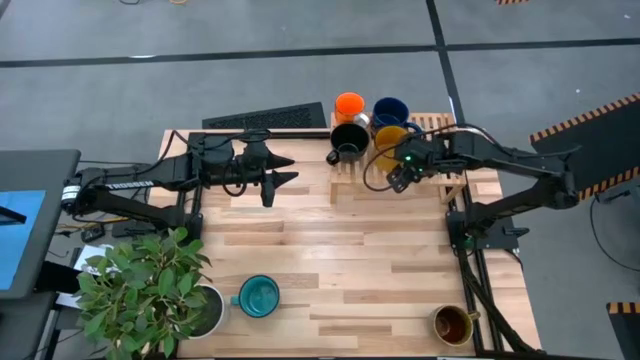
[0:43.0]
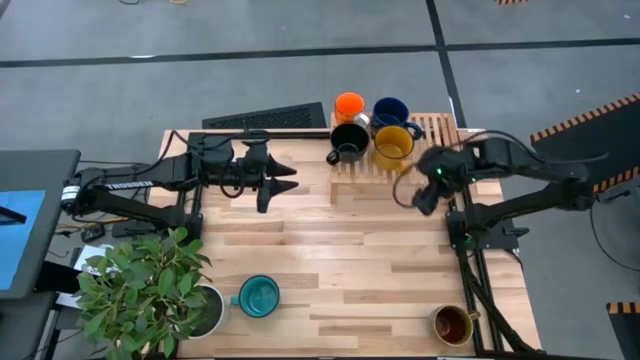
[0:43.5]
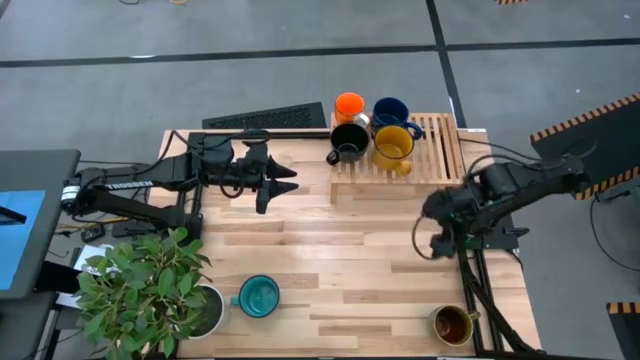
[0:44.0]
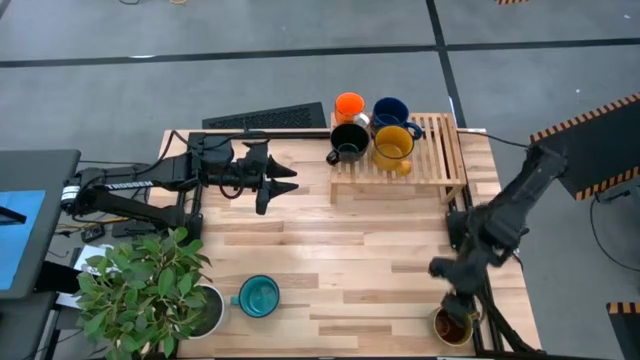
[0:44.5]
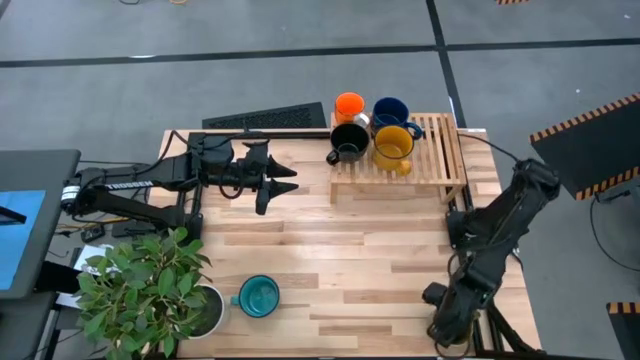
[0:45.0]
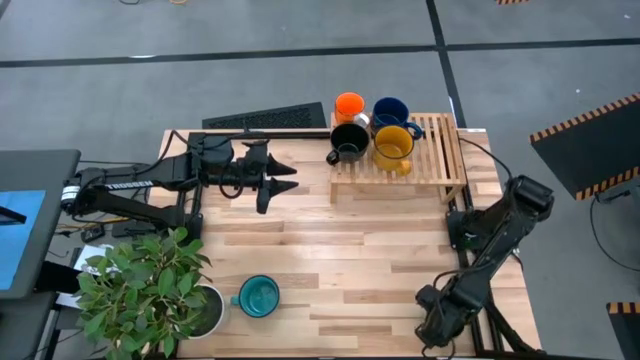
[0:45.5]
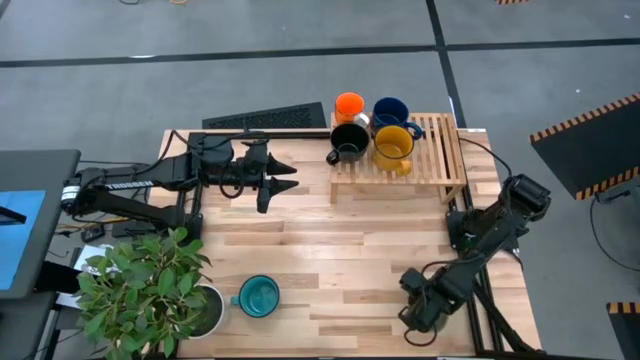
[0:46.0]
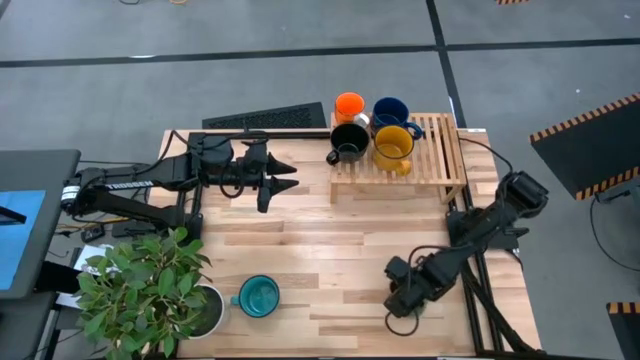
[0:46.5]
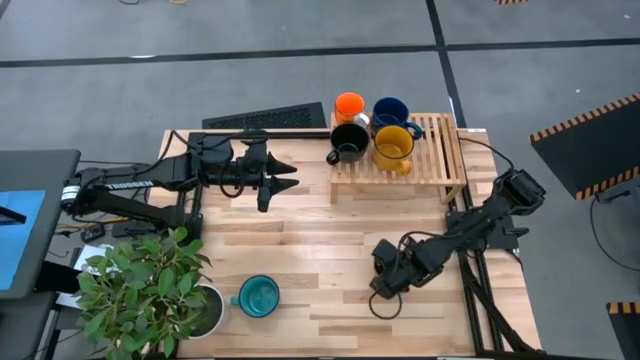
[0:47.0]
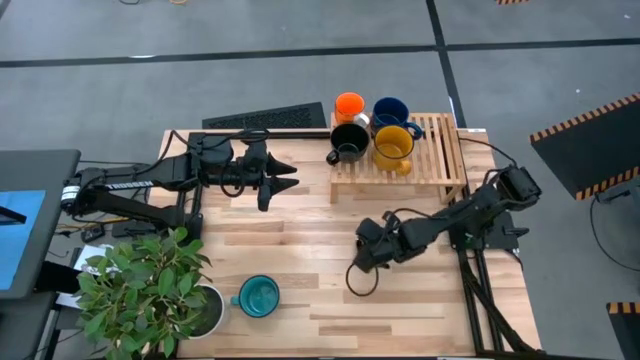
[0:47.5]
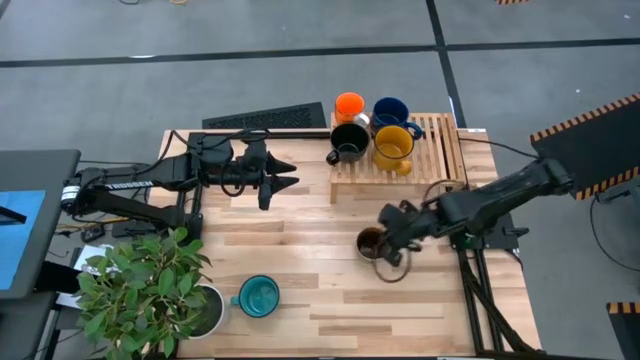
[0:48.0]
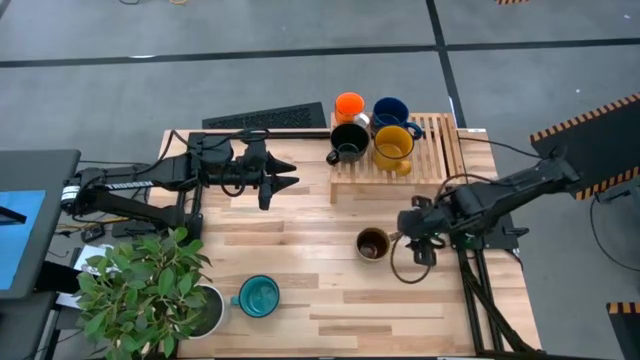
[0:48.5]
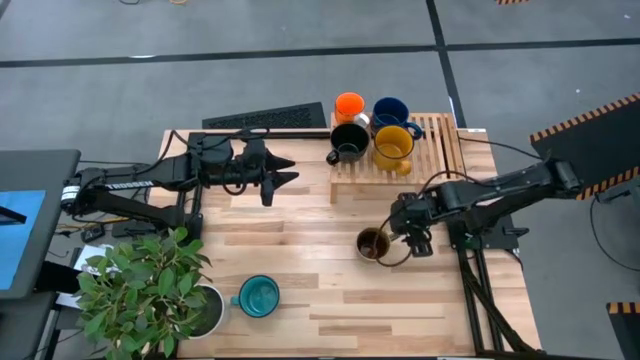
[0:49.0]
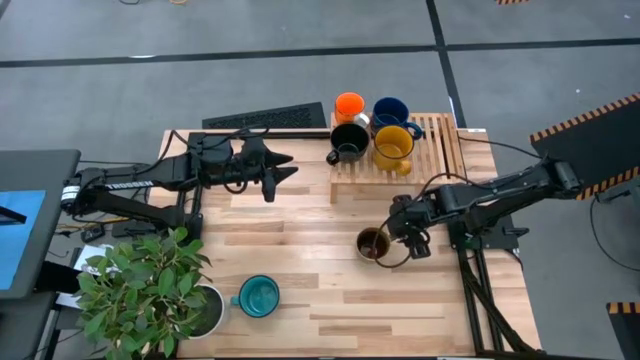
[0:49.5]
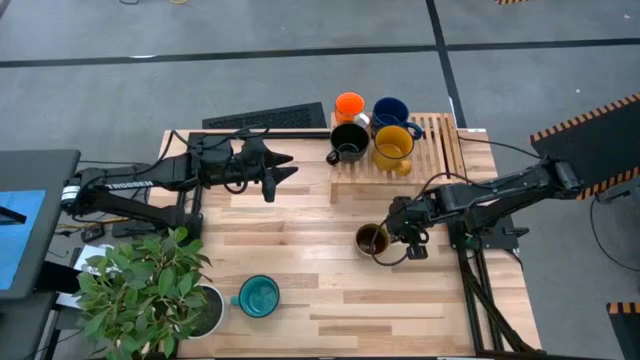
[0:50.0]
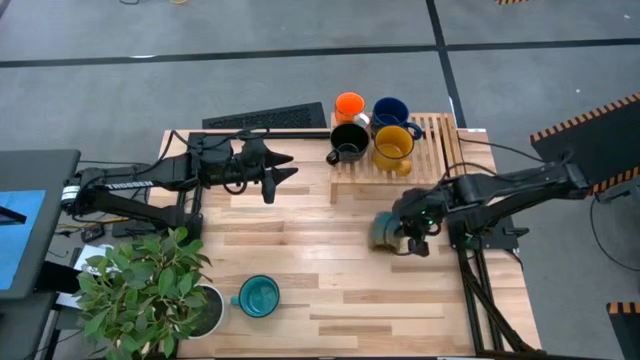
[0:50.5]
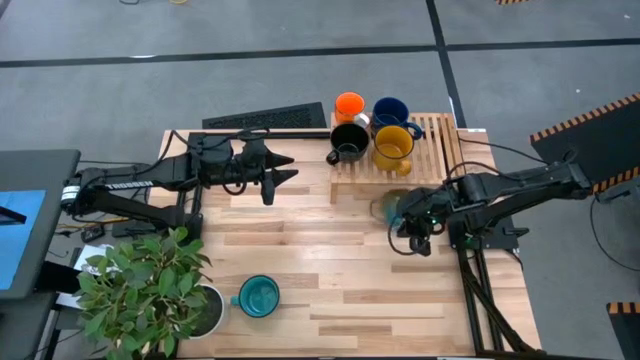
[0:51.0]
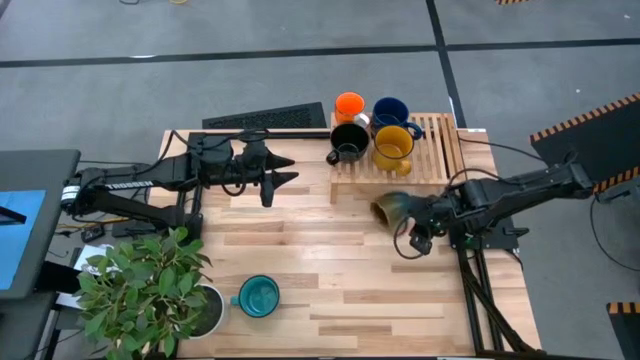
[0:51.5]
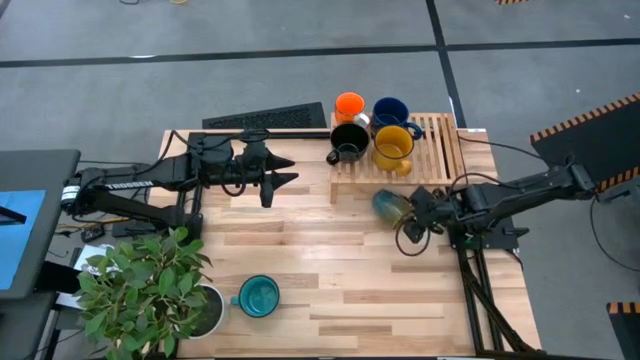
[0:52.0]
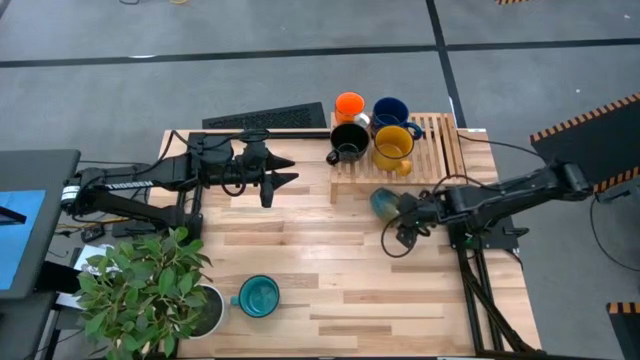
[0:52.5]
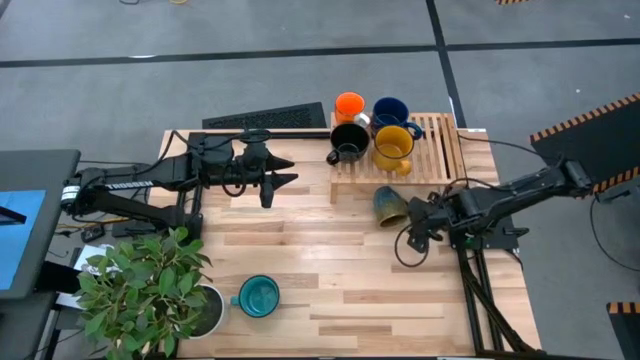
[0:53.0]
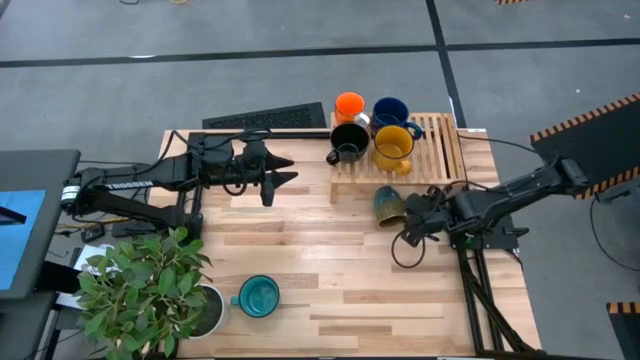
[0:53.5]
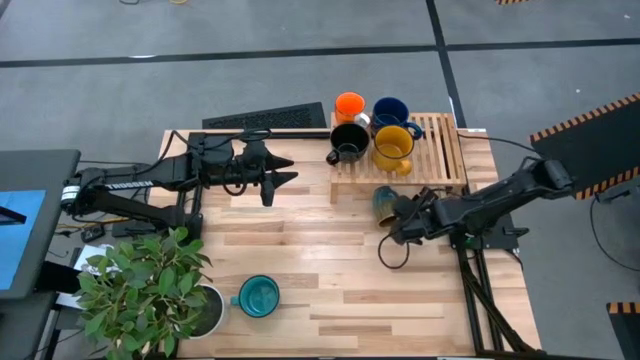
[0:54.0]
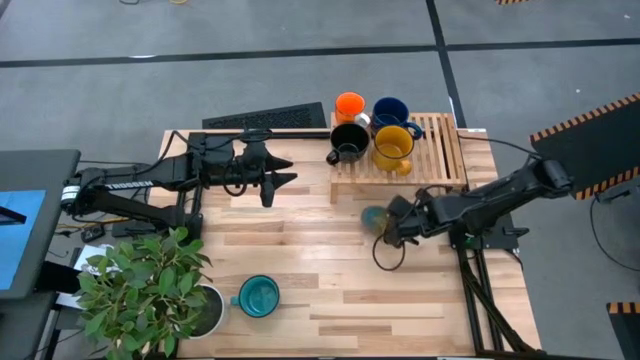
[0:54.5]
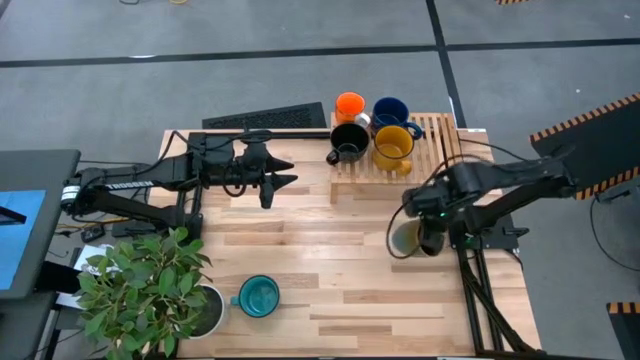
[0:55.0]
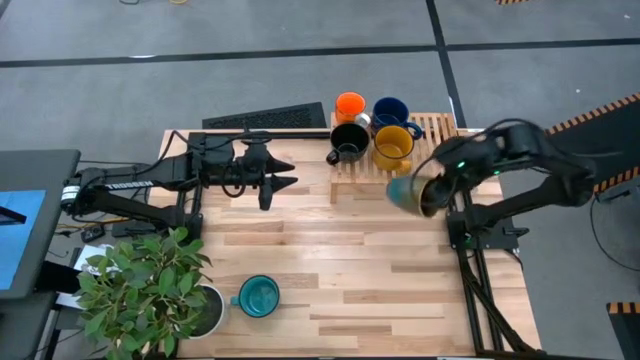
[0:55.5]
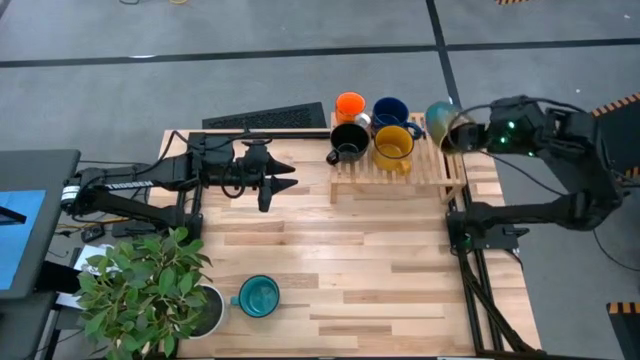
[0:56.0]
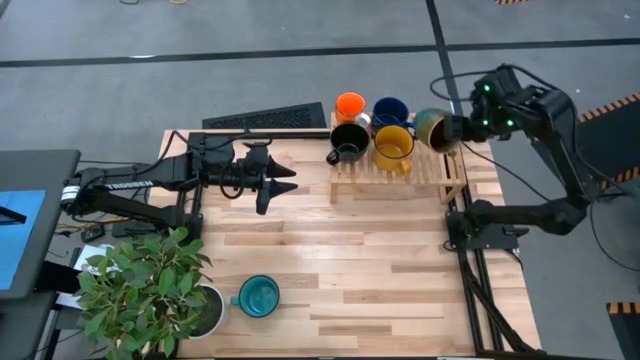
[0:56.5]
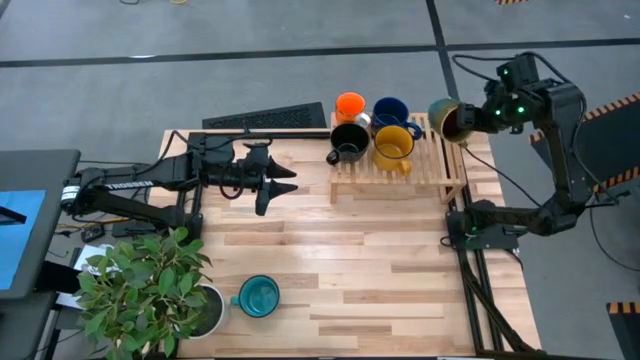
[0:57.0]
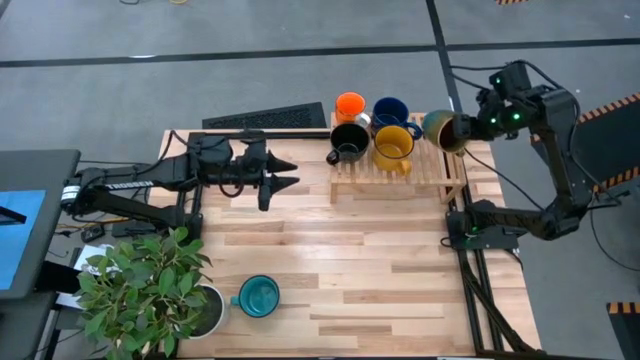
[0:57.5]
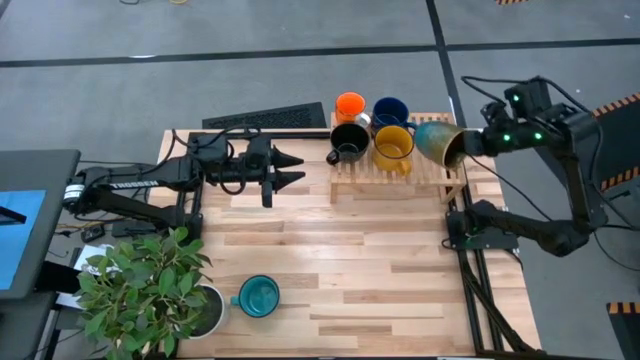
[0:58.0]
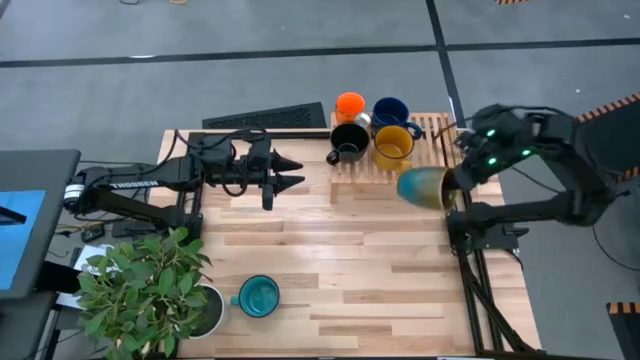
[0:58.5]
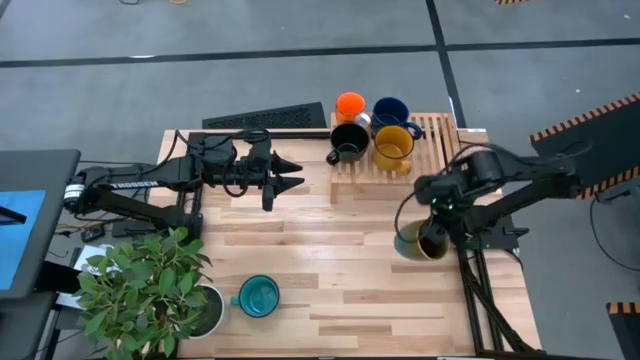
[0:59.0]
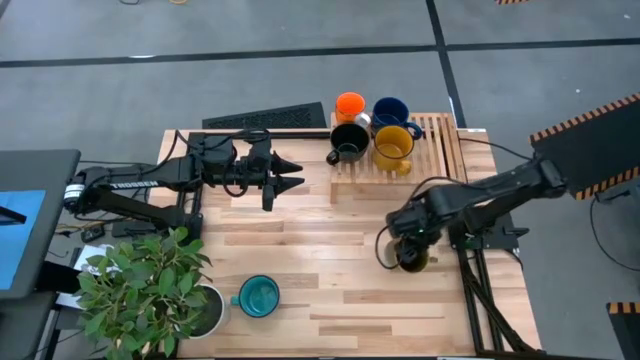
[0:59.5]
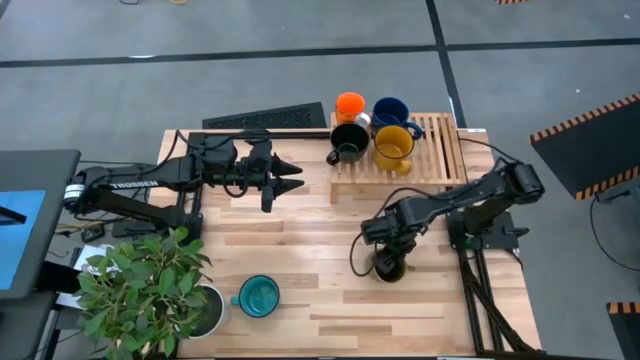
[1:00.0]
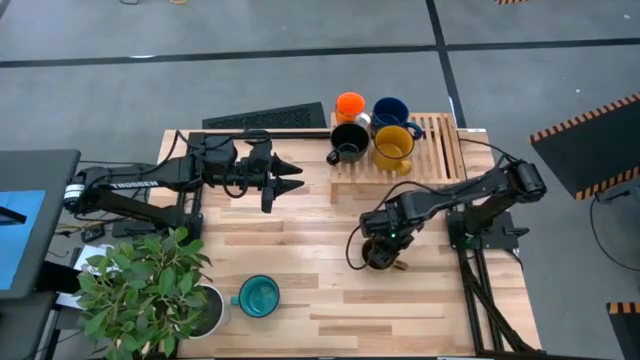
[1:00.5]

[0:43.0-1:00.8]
Task: Place coffee mugs
Put the dark green patterned mug on the shelf

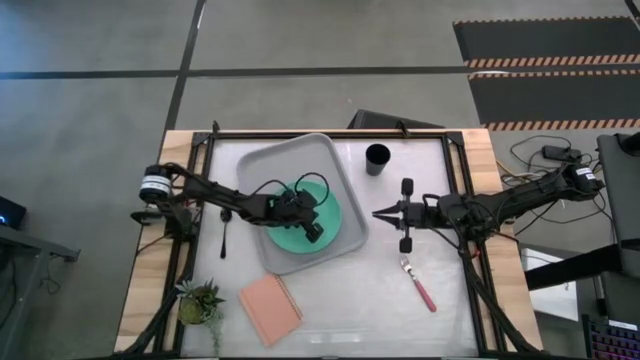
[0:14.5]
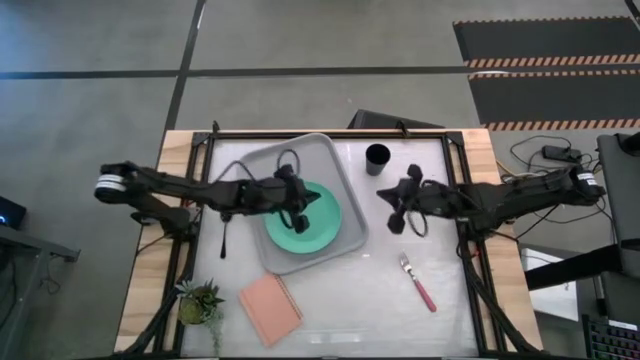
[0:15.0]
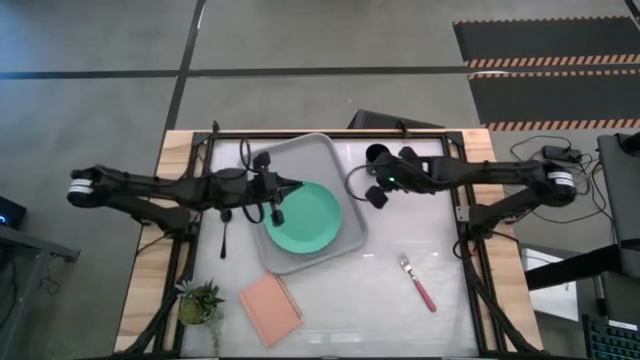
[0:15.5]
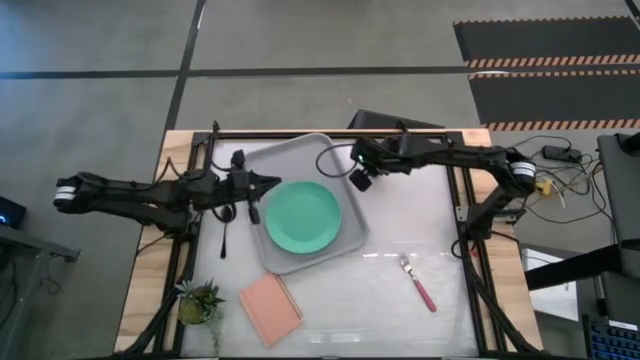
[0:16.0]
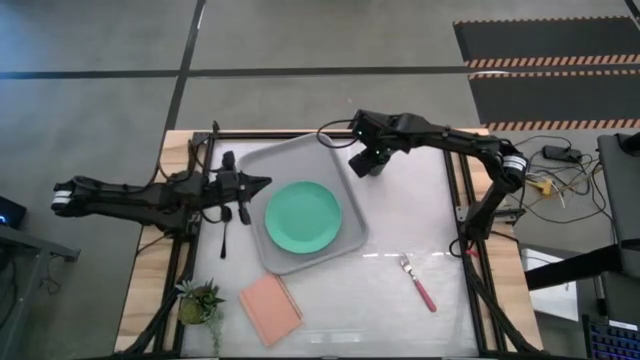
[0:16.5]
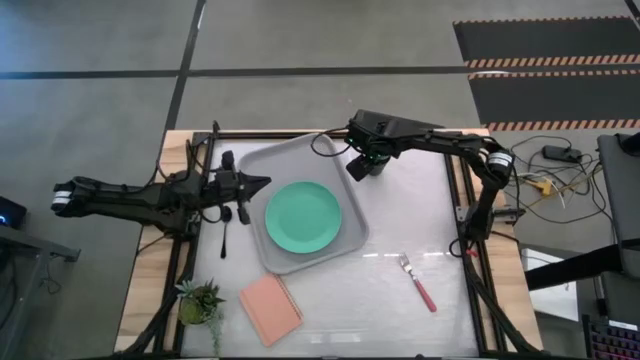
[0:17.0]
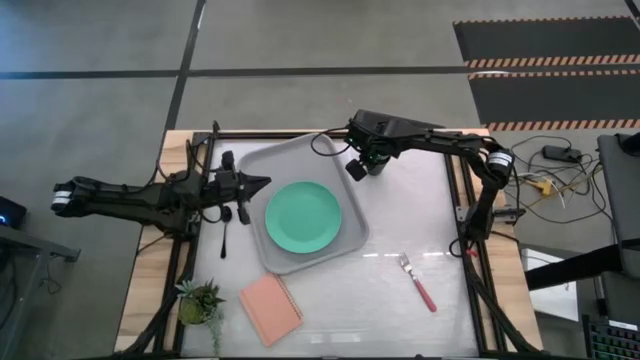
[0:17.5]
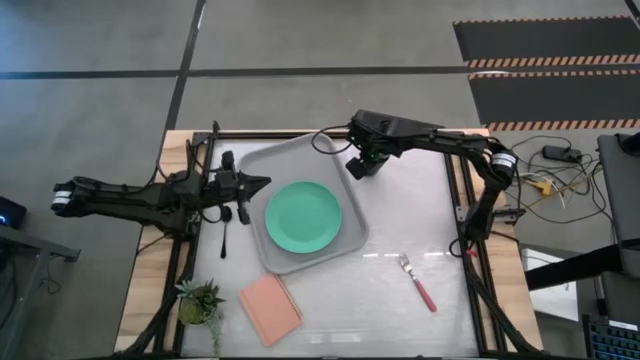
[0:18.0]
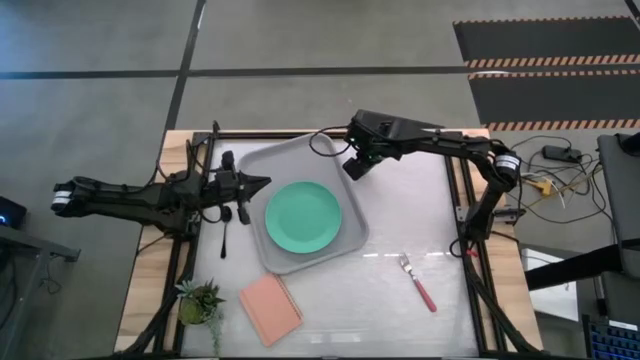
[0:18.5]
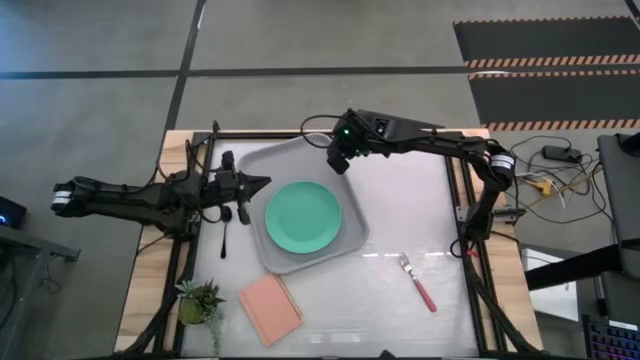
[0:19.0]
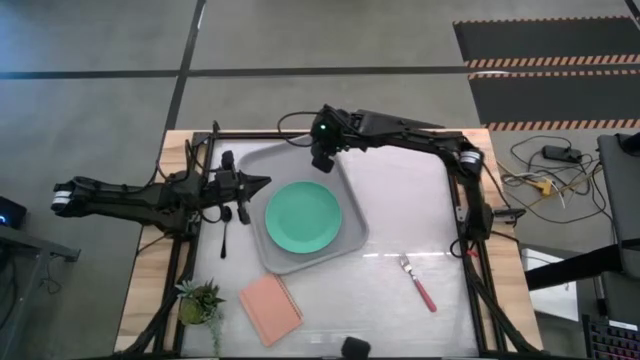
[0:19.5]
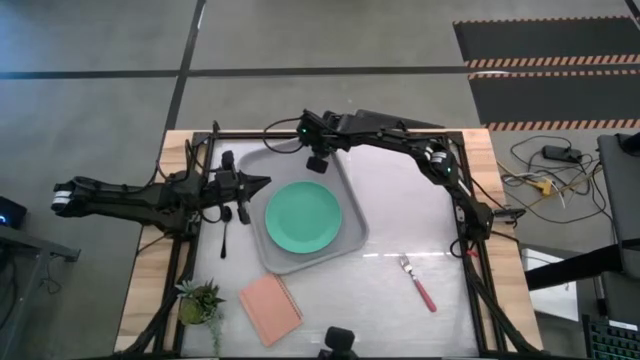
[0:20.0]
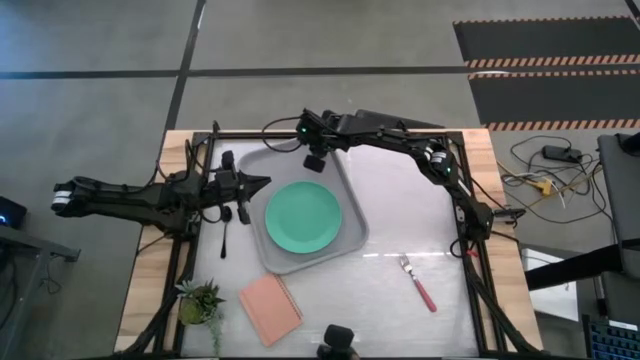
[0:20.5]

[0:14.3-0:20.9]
Task: Pick and place plate/cup/fork/spoon on tray
Put the black cup on the top left of the gray serving tray
